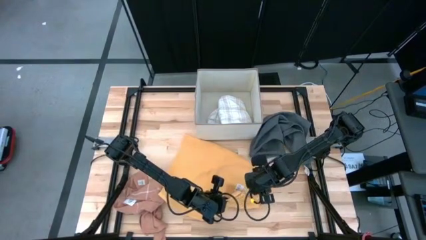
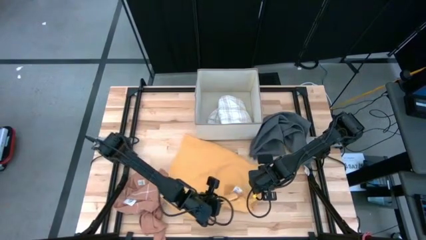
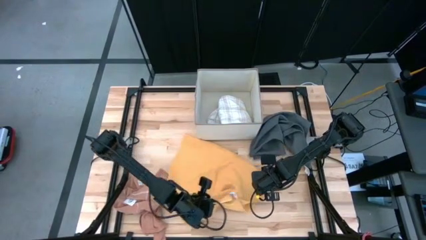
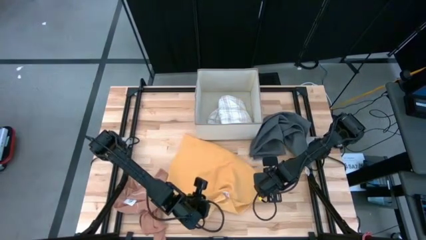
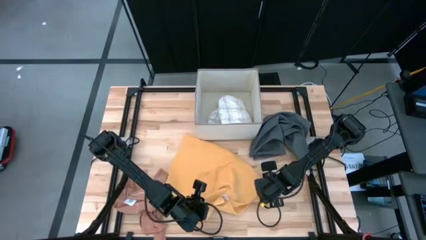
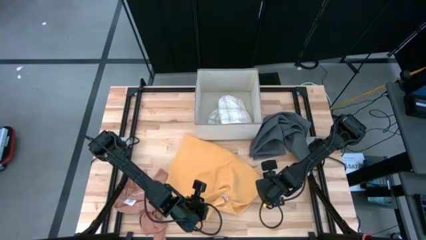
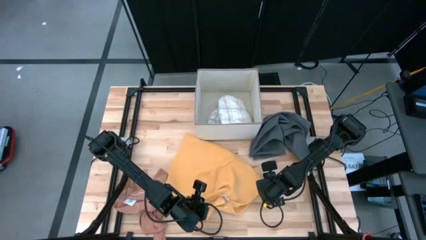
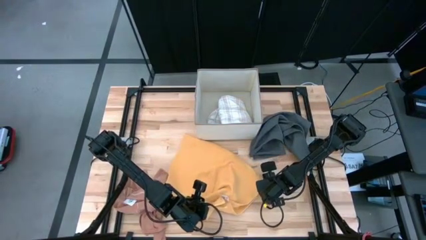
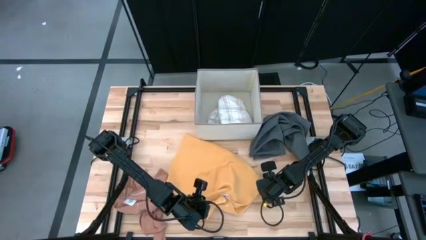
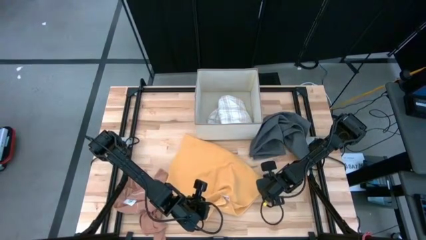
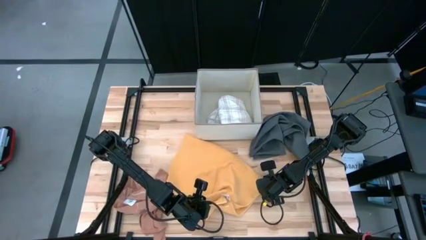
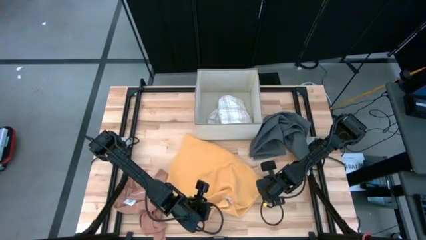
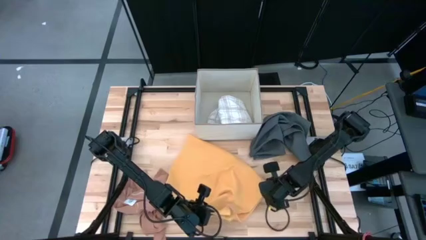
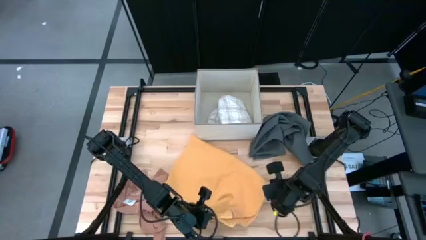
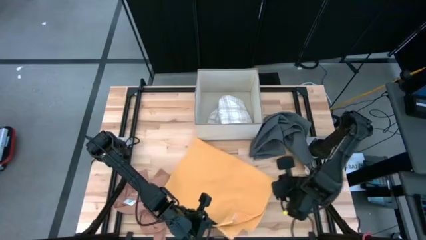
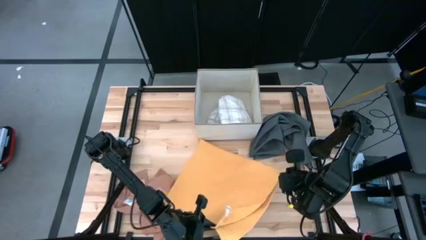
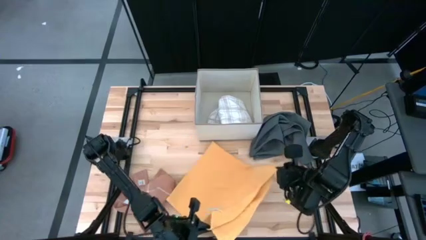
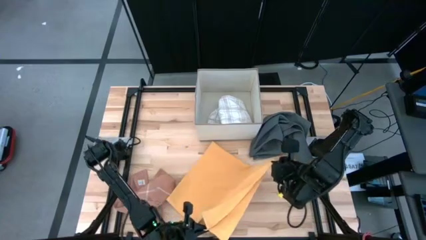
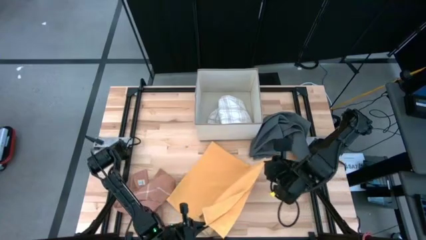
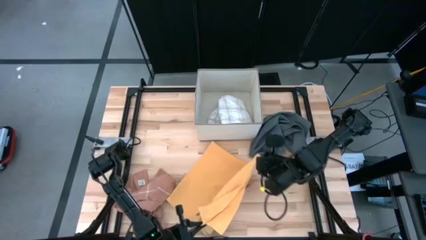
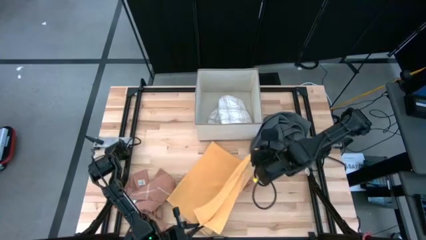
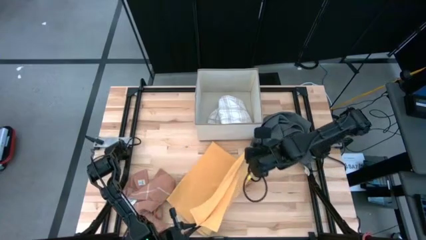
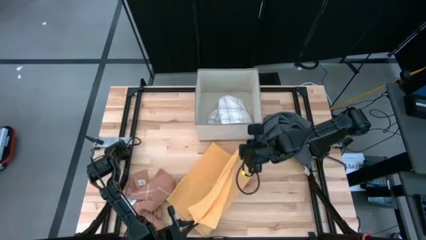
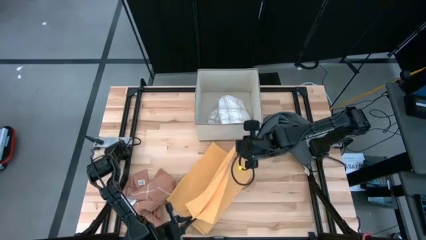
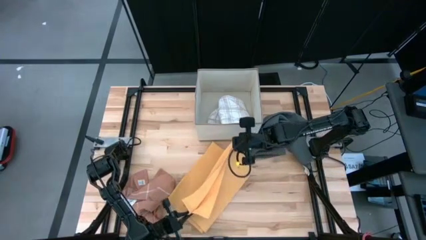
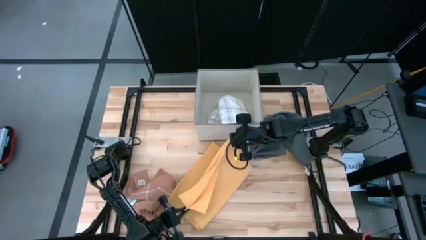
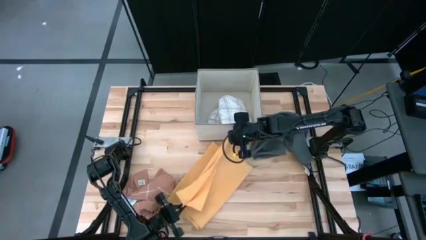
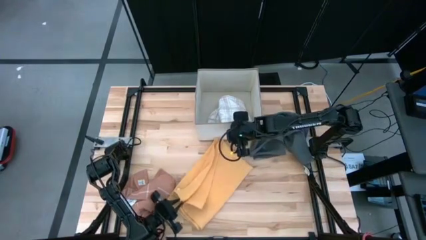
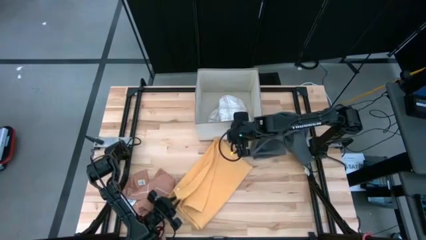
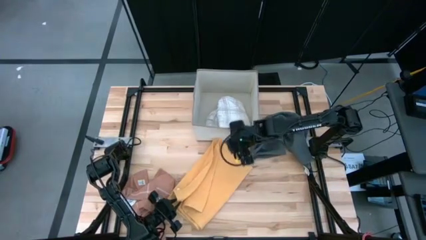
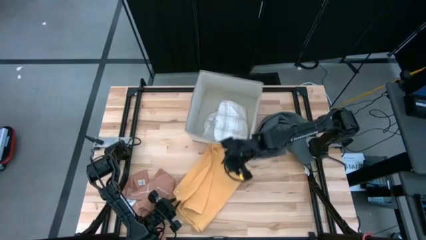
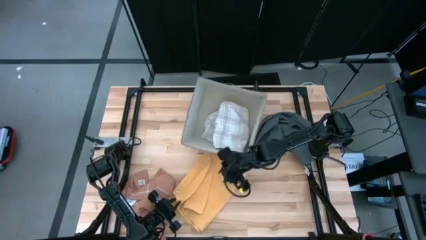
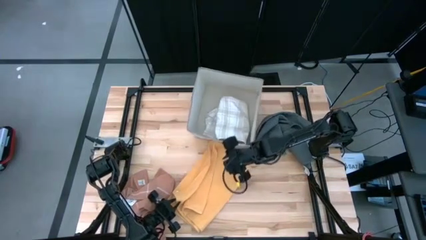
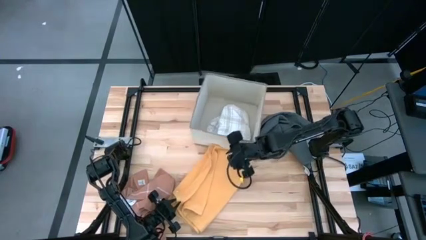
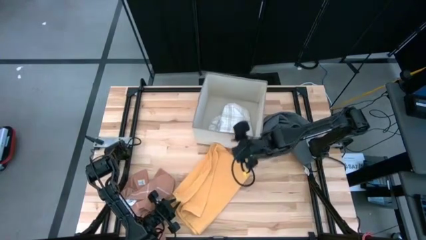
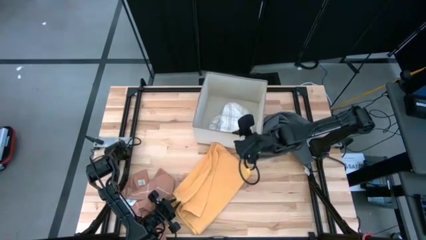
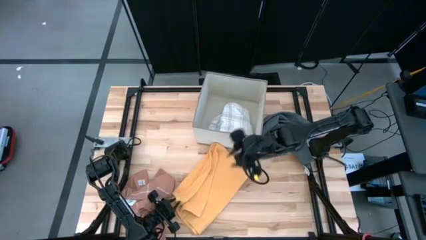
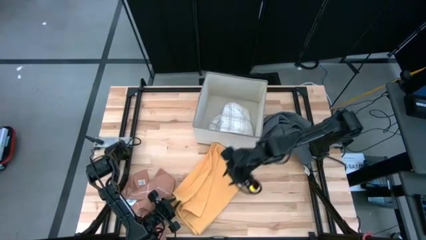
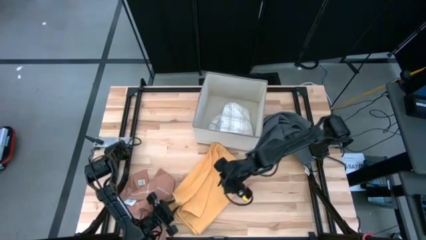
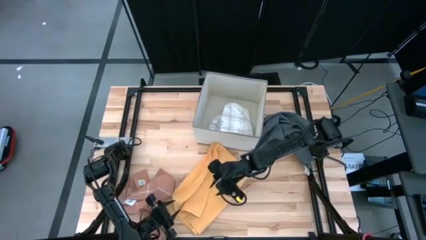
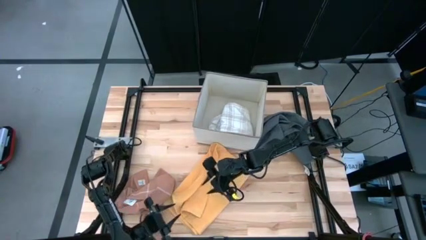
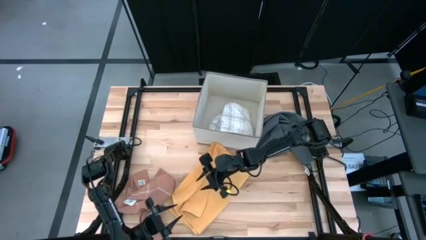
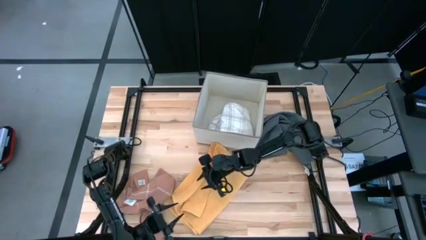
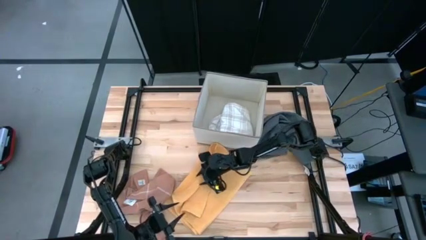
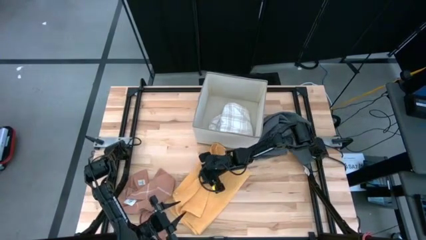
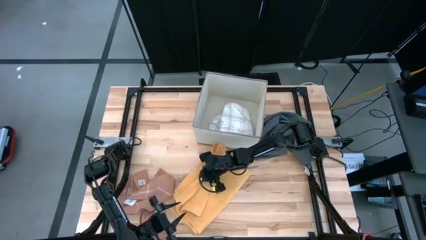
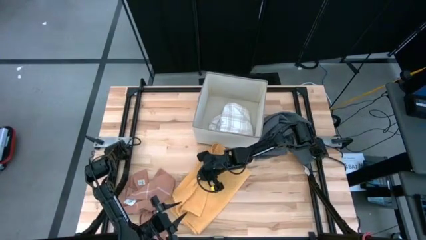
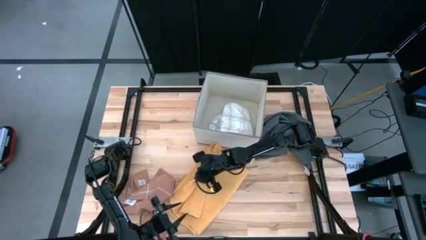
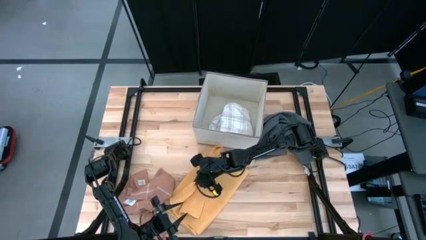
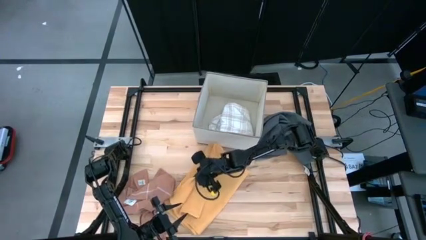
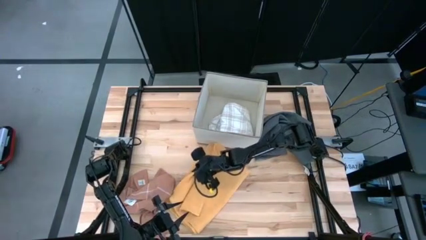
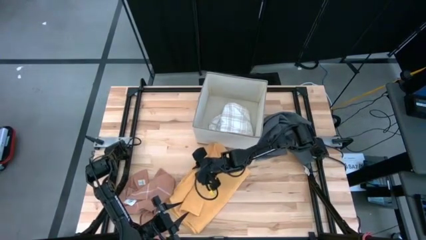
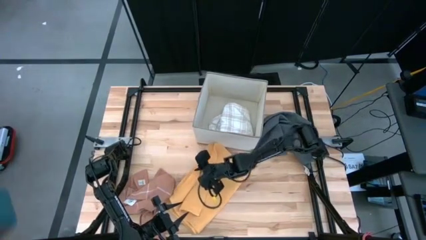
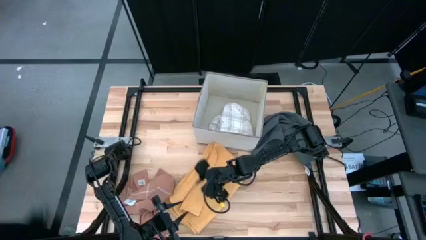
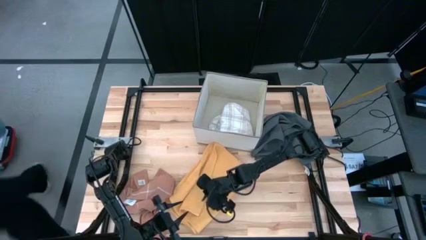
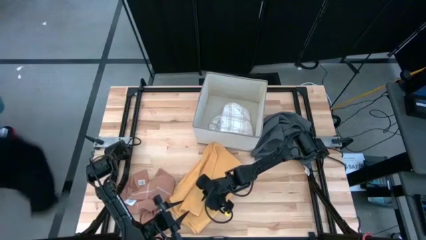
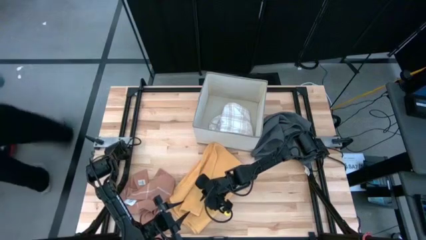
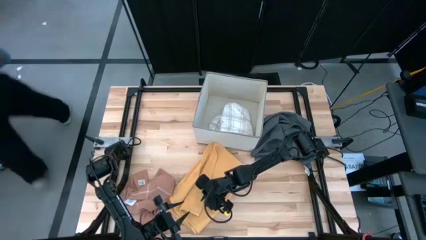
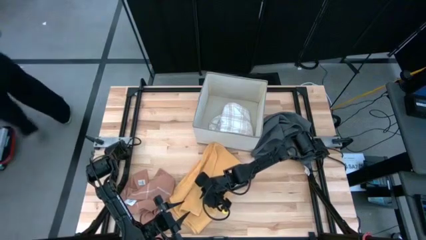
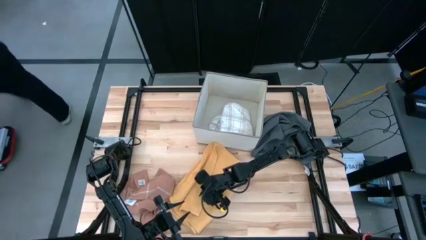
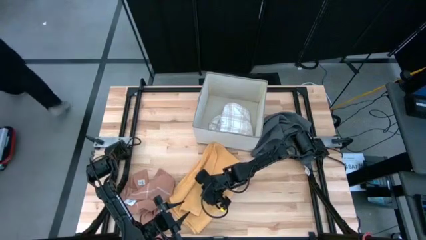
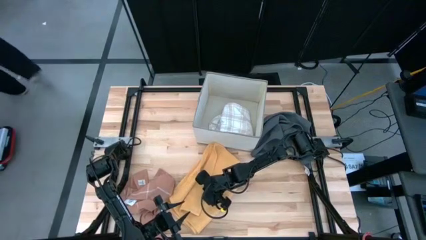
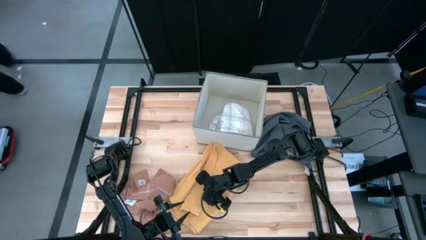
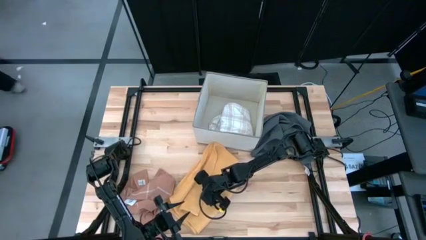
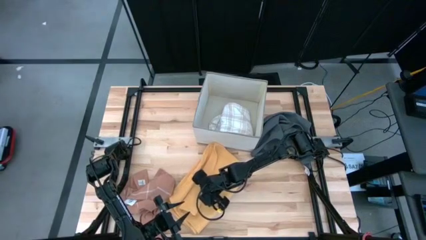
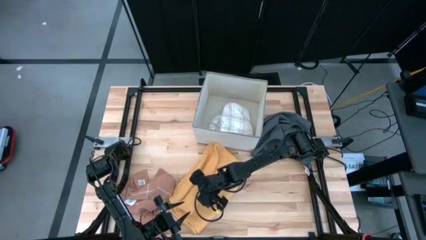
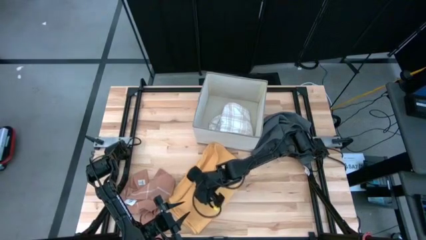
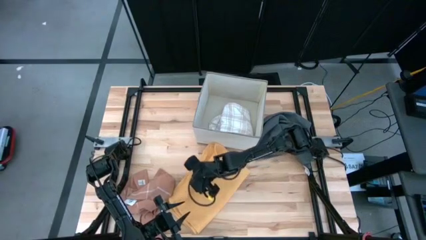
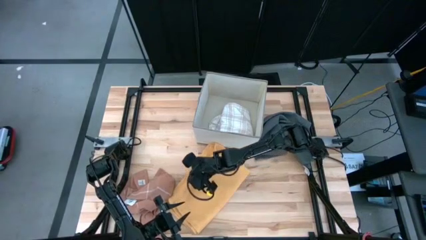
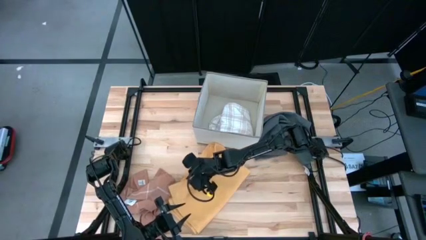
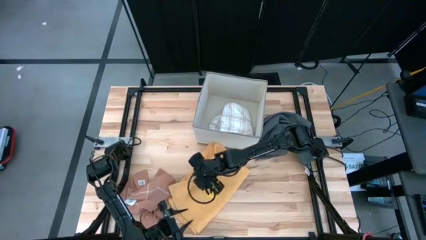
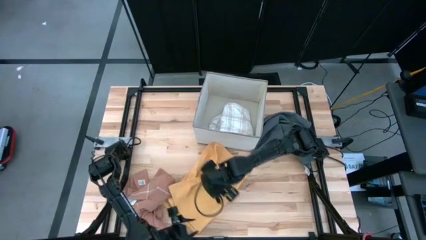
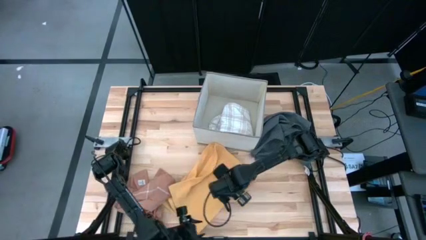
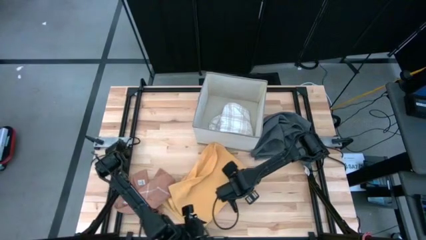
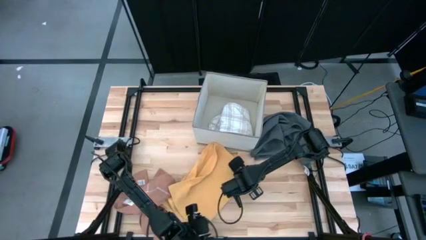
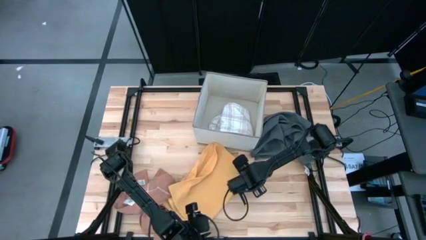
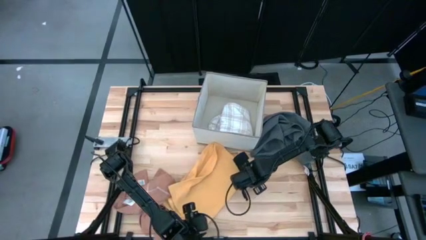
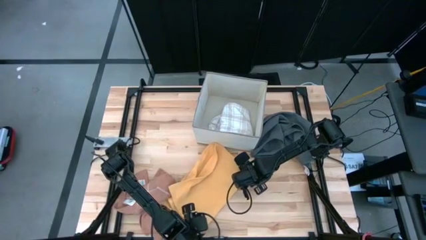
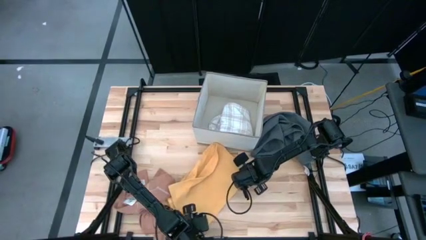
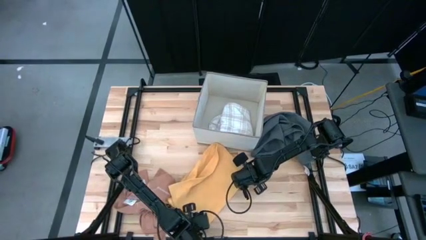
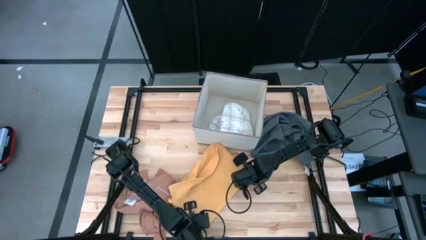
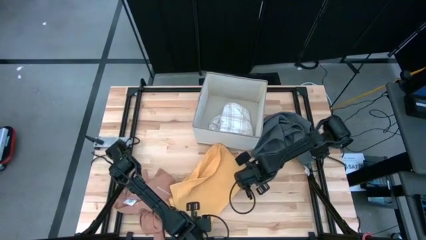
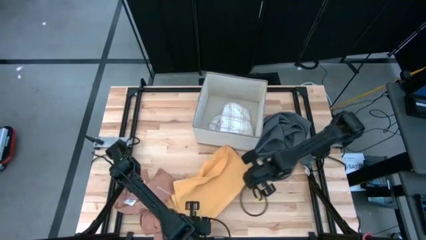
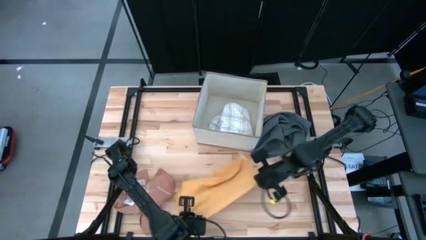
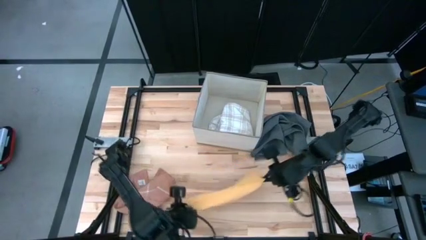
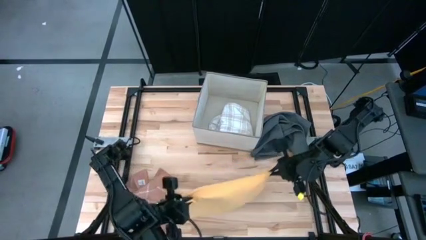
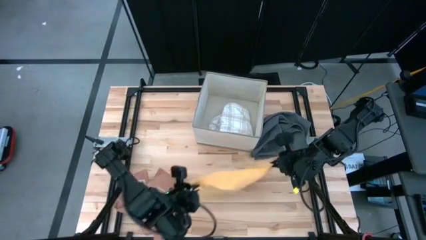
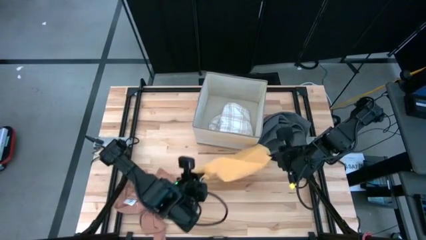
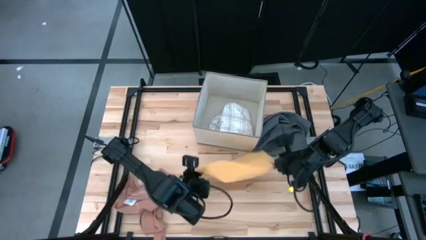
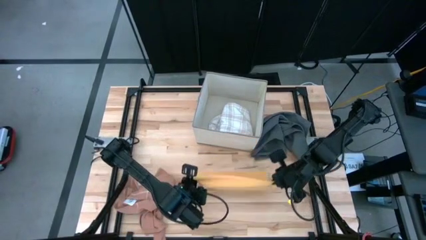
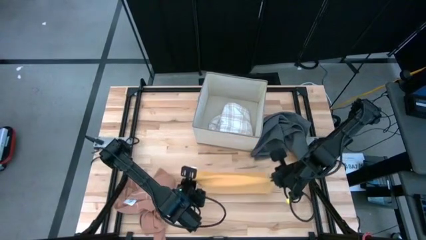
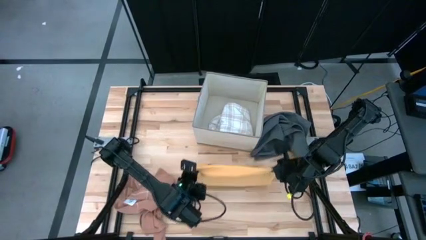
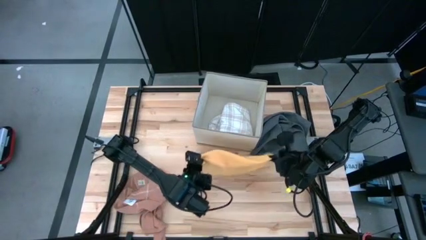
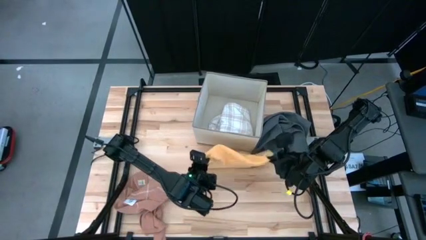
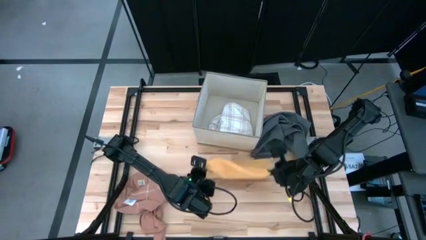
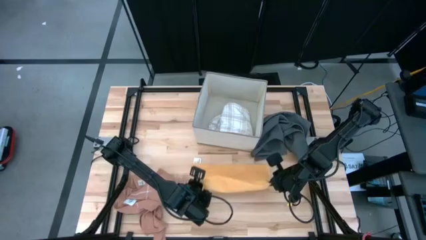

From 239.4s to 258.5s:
Task: Fold towel
Fold the yellow towel
